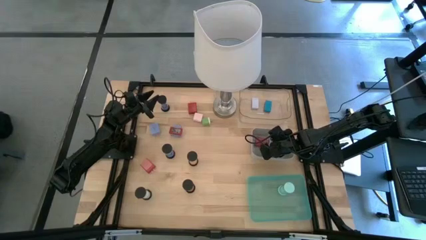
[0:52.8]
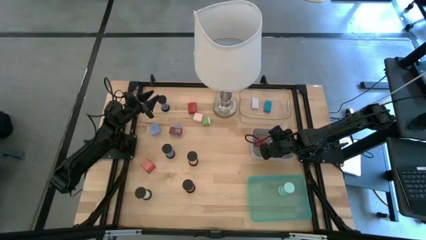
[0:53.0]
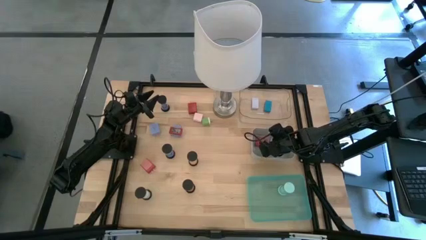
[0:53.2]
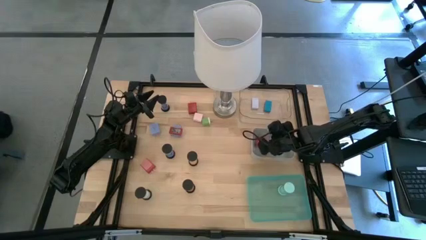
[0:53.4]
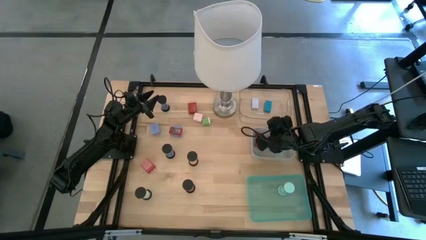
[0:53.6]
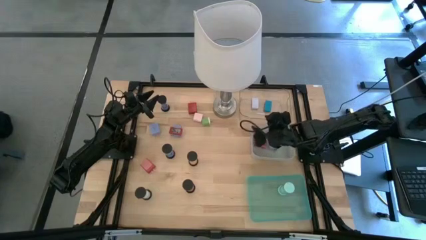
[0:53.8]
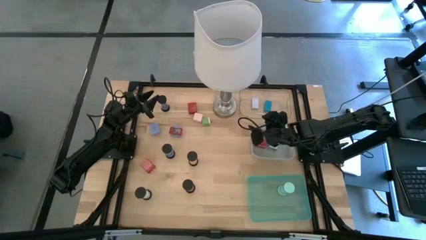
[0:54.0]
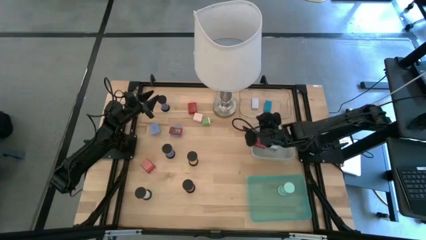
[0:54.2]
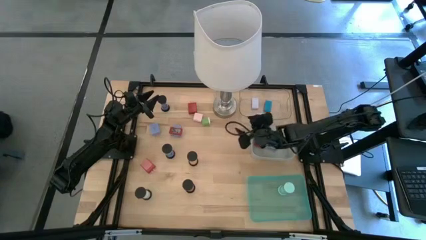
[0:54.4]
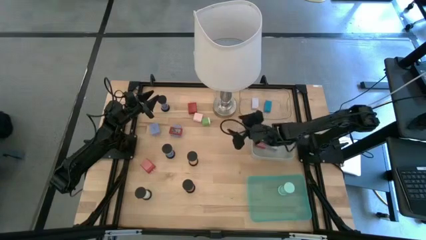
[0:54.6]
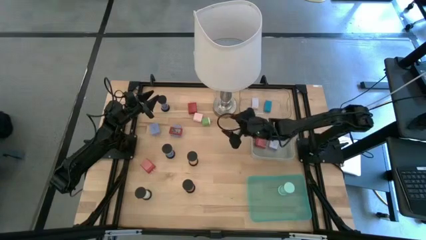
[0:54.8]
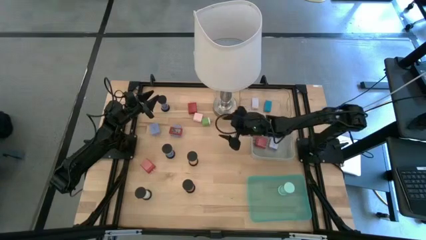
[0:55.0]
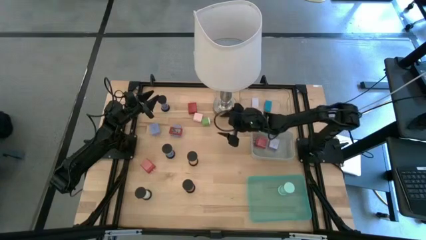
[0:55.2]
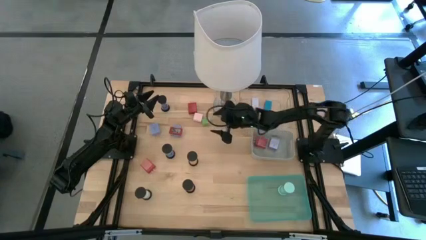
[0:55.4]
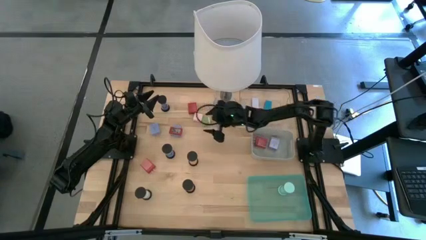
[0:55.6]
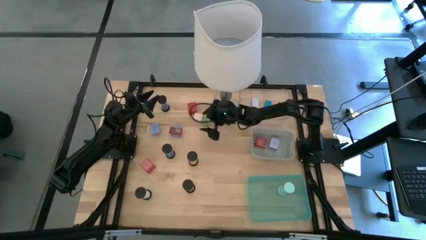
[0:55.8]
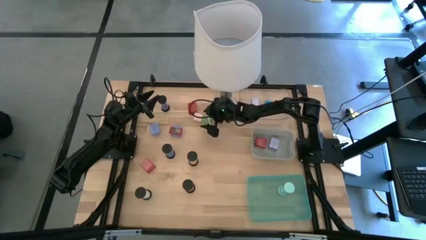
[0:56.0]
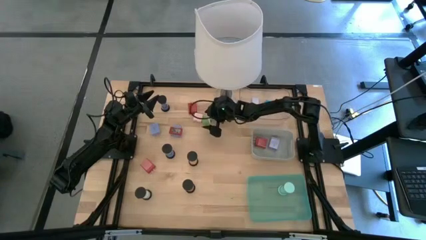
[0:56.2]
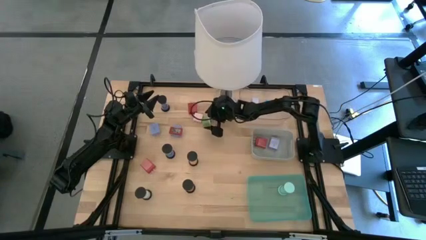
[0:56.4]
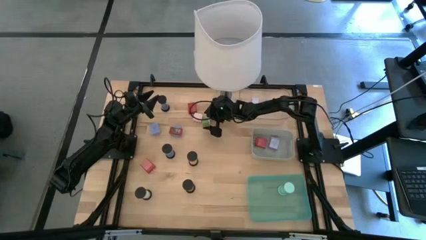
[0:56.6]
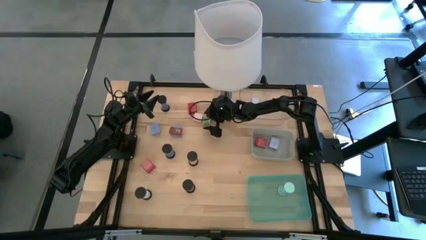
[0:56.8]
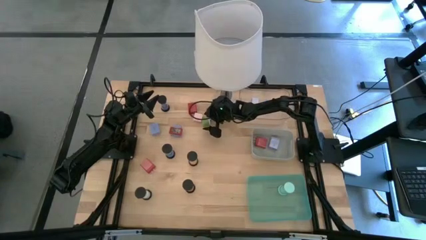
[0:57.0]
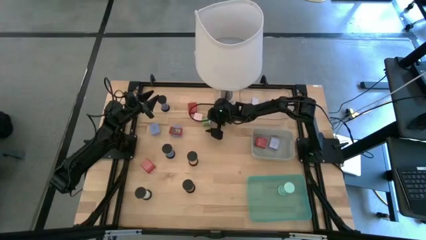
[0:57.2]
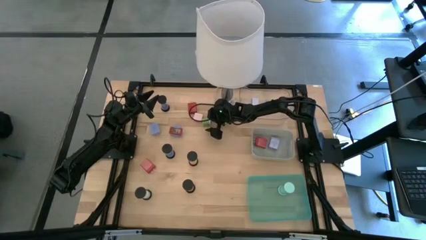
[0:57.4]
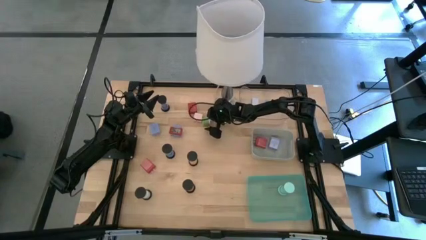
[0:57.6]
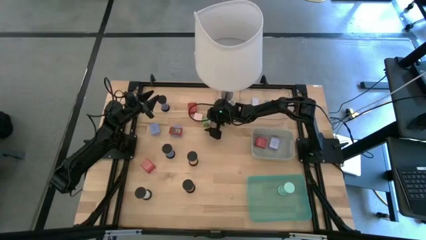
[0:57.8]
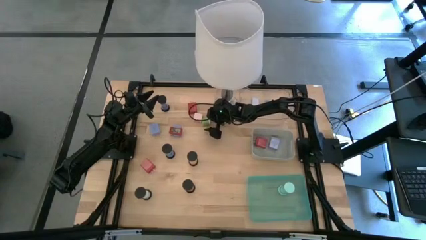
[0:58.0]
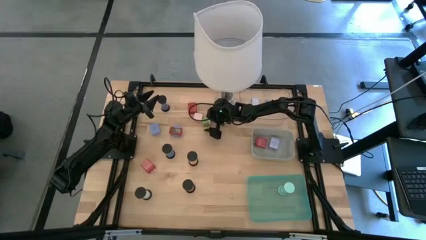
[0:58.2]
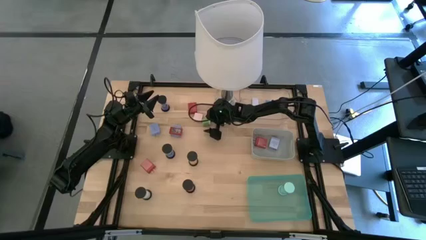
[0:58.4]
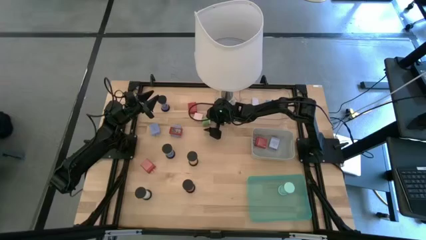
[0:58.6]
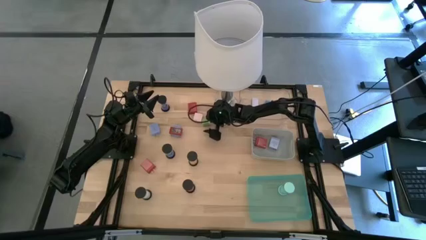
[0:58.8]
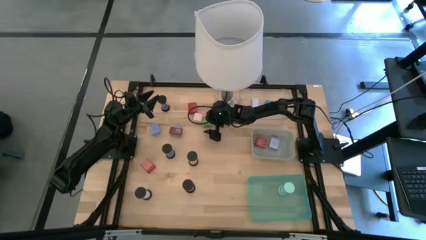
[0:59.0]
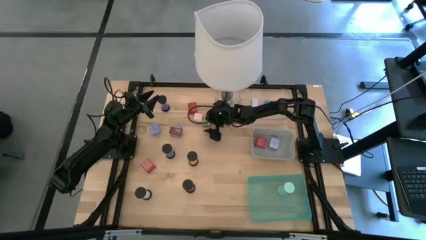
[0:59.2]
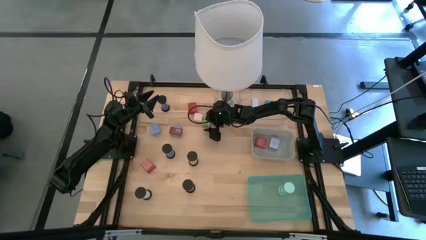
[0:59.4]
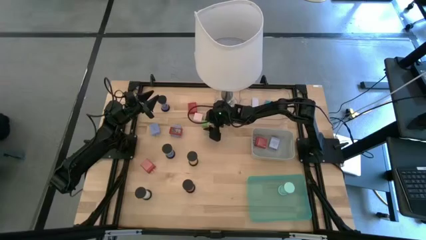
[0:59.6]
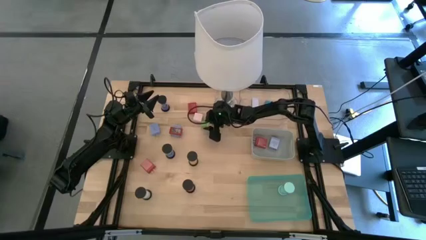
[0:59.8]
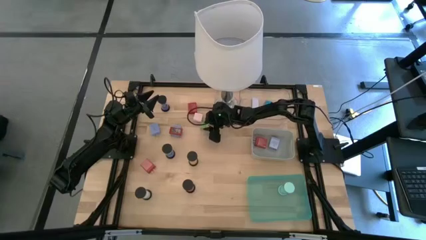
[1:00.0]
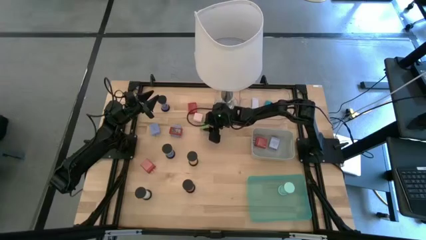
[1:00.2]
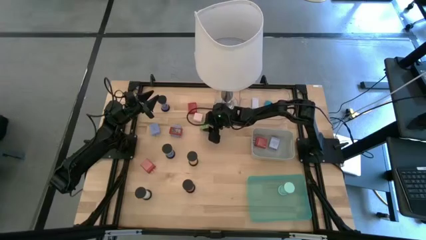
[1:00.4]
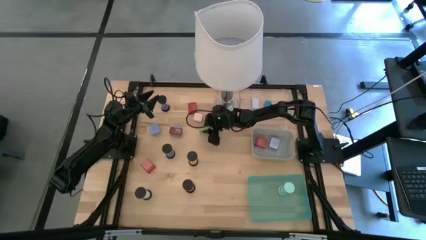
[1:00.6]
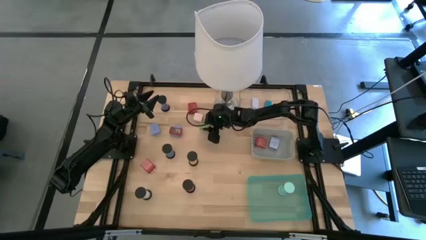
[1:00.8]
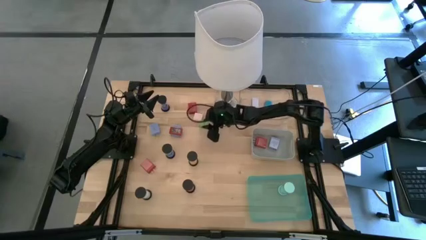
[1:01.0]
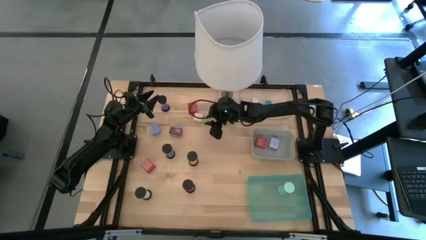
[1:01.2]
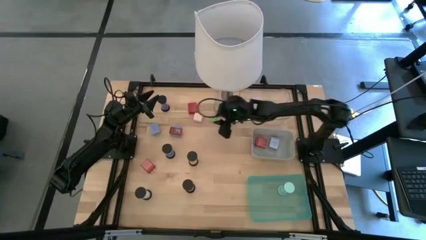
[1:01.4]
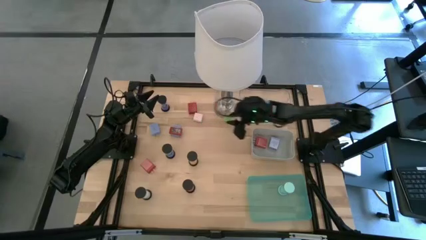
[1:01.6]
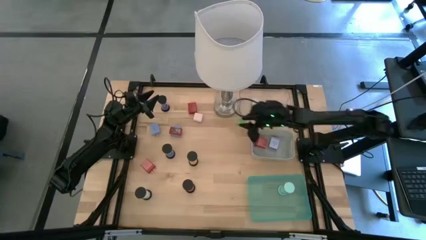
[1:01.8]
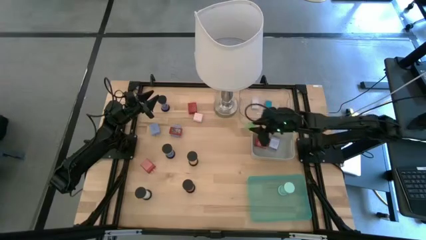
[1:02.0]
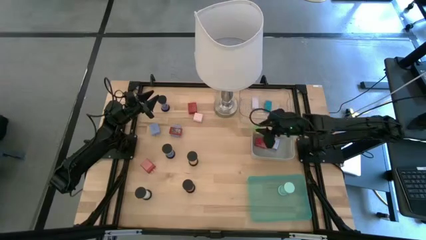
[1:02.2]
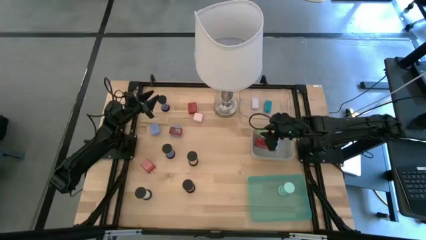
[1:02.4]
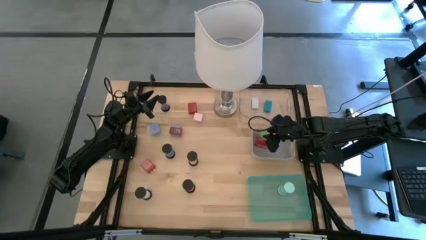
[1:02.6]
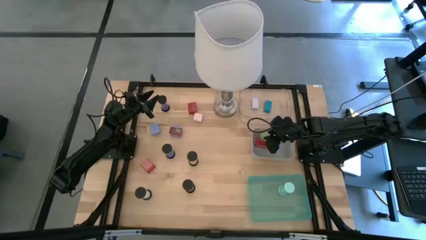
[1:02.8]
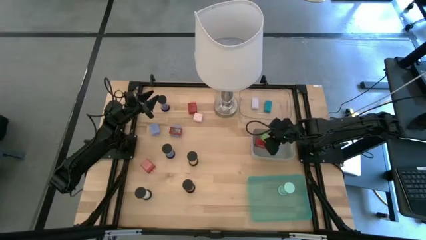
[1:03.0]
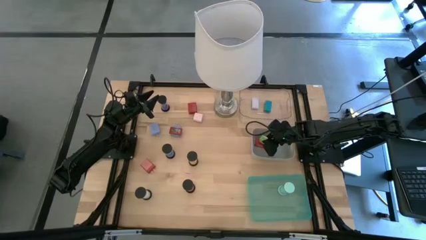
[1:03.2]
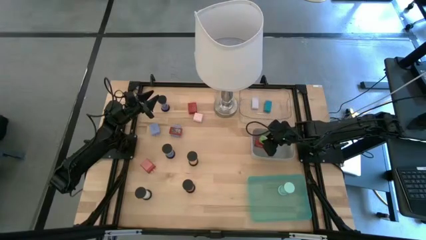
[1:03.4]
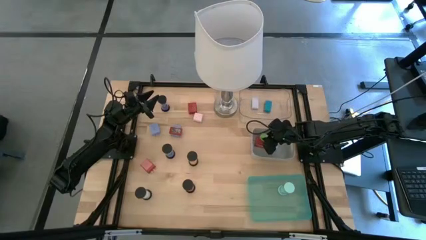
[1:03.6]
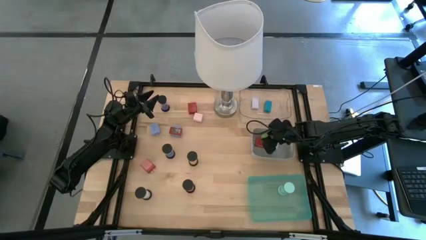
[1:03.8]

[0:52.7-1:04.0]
Task: Pick & Place Office items
Put the green charger adapter into the gray bin
